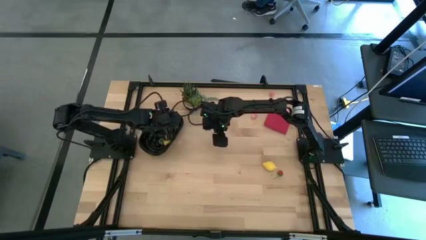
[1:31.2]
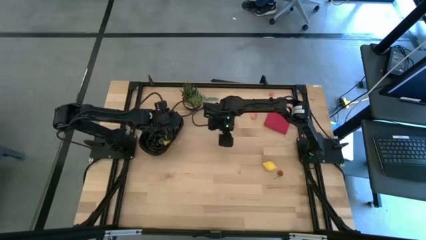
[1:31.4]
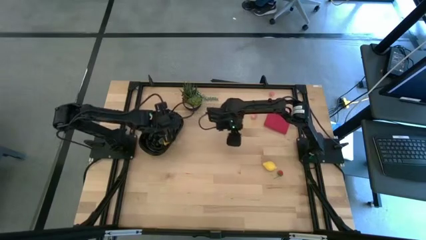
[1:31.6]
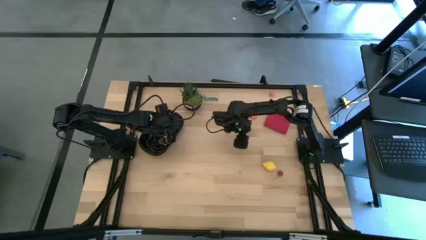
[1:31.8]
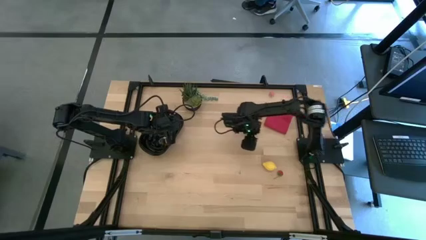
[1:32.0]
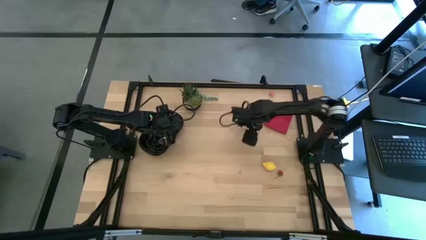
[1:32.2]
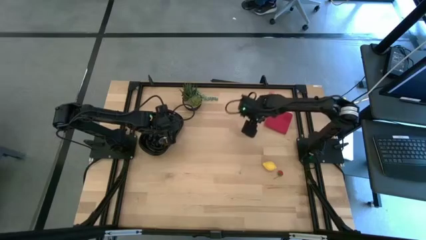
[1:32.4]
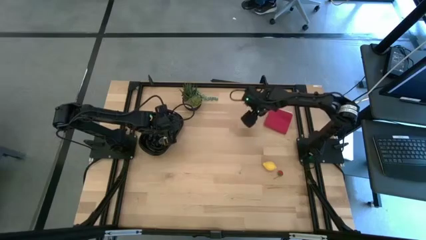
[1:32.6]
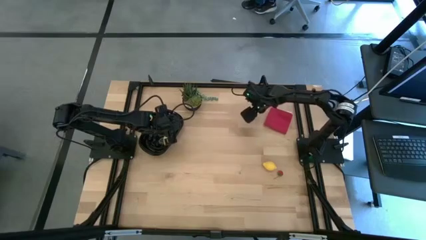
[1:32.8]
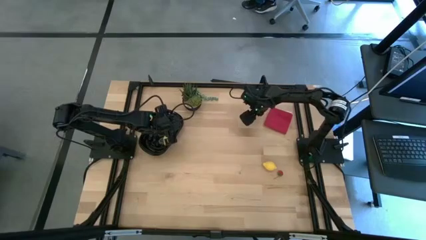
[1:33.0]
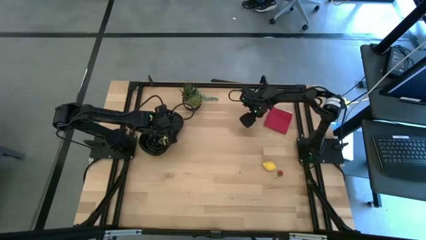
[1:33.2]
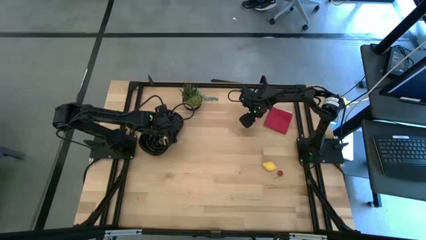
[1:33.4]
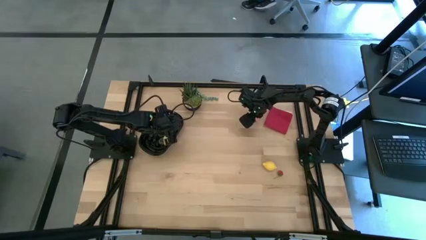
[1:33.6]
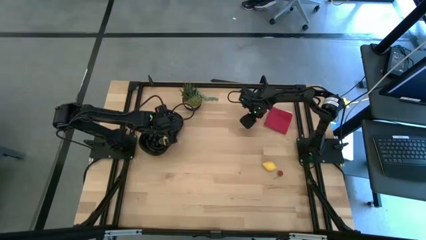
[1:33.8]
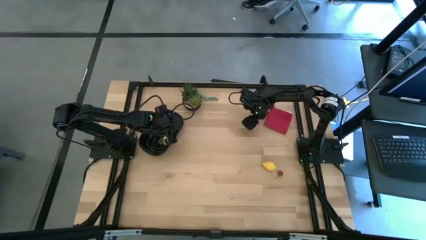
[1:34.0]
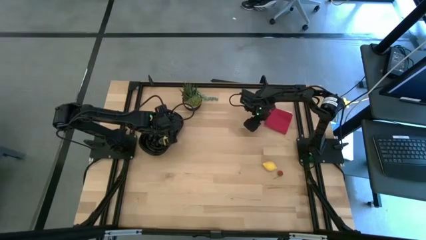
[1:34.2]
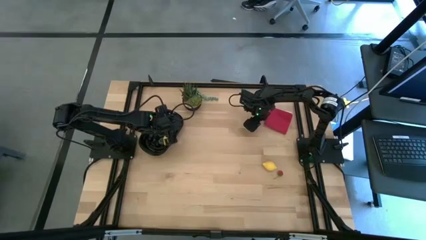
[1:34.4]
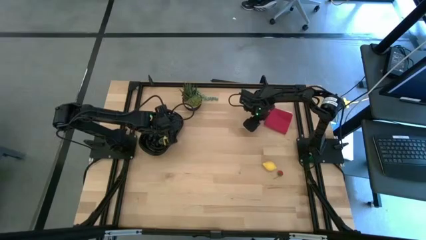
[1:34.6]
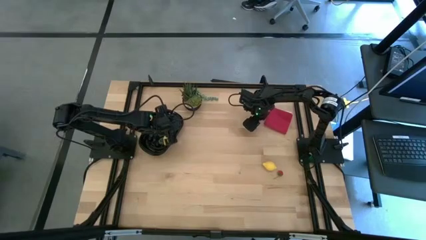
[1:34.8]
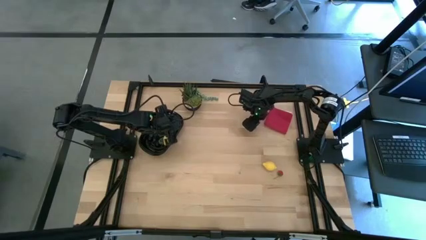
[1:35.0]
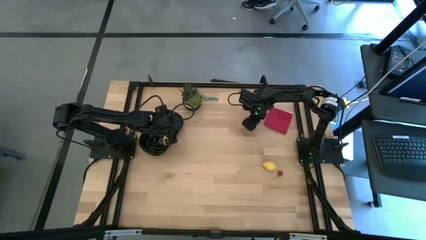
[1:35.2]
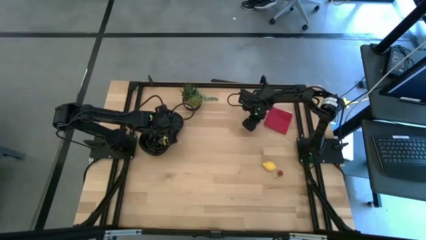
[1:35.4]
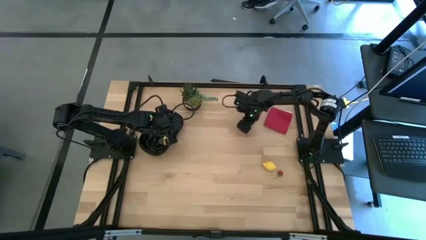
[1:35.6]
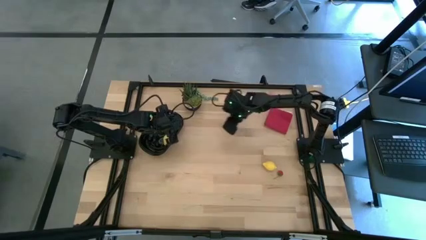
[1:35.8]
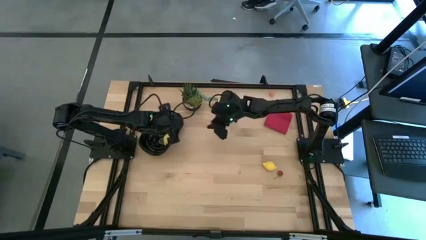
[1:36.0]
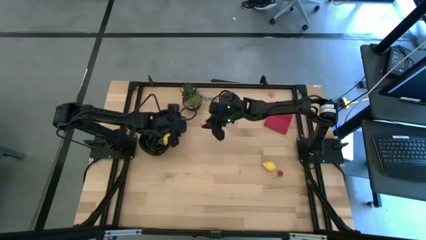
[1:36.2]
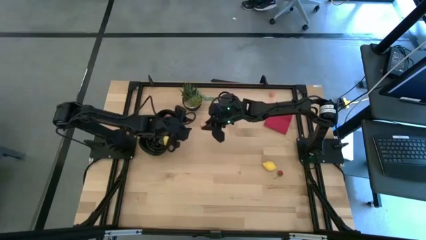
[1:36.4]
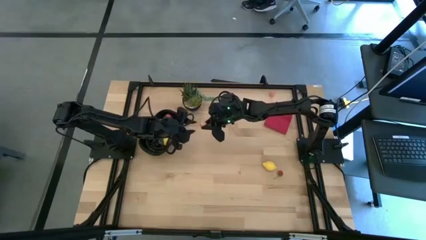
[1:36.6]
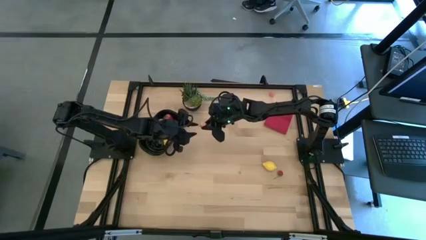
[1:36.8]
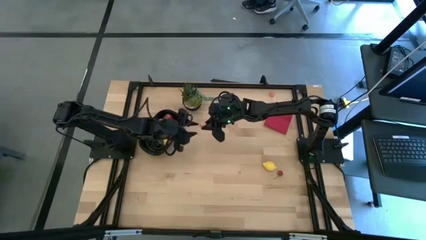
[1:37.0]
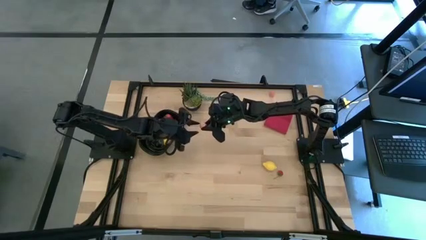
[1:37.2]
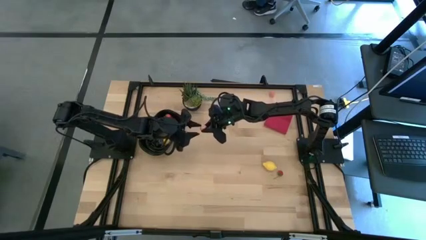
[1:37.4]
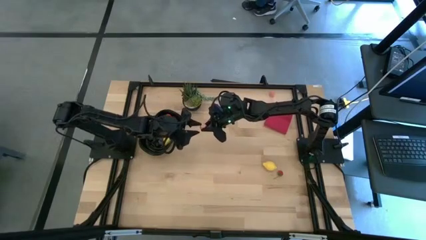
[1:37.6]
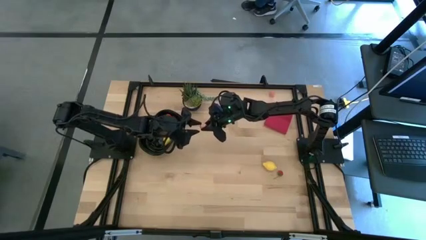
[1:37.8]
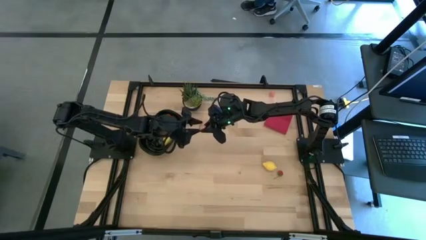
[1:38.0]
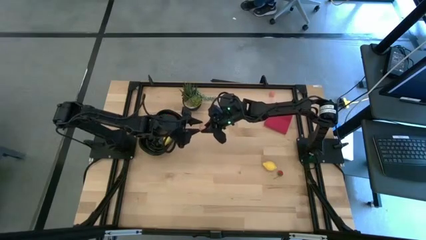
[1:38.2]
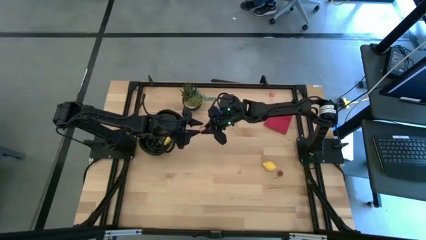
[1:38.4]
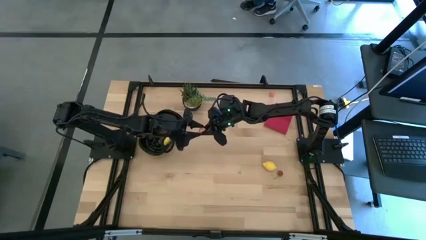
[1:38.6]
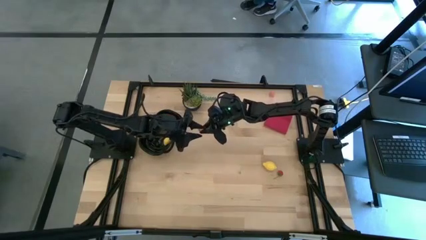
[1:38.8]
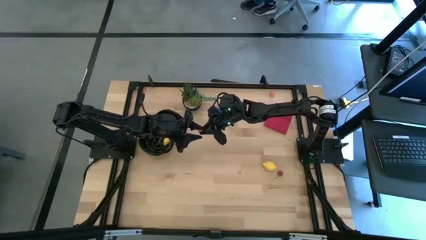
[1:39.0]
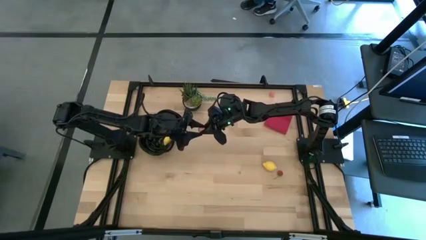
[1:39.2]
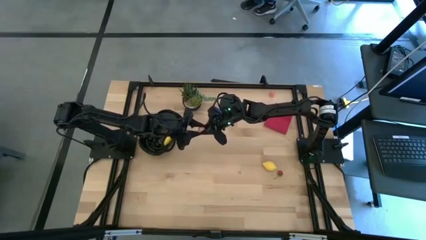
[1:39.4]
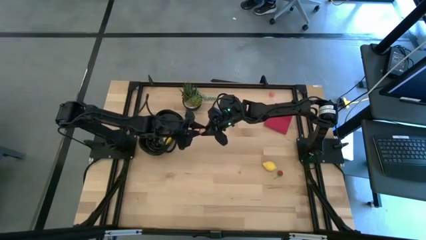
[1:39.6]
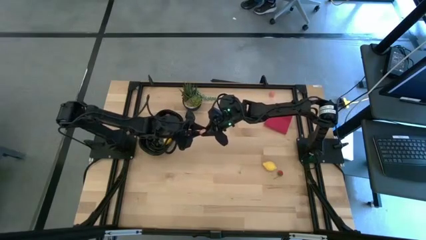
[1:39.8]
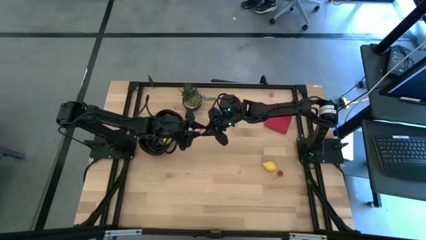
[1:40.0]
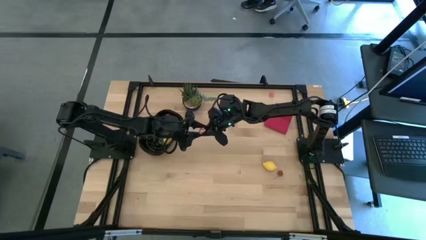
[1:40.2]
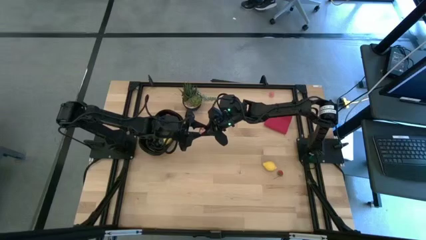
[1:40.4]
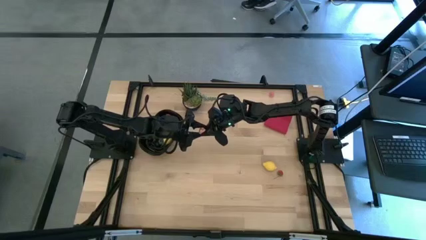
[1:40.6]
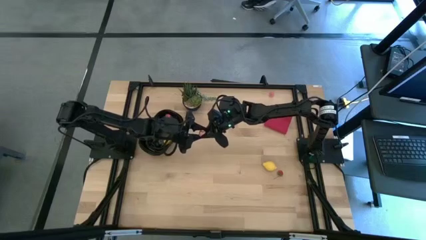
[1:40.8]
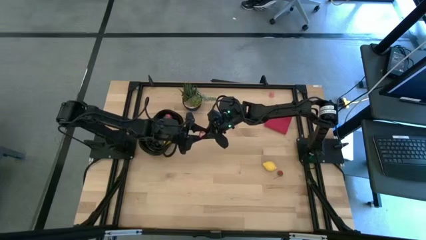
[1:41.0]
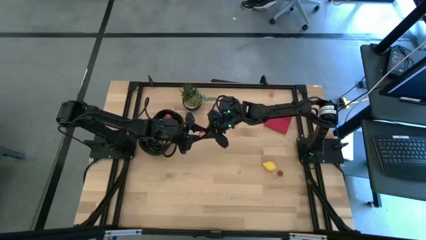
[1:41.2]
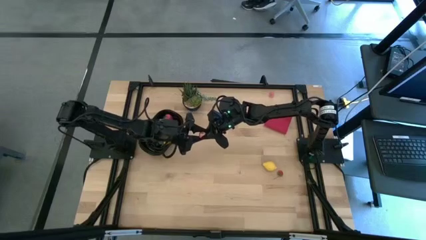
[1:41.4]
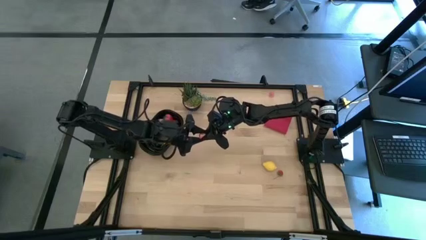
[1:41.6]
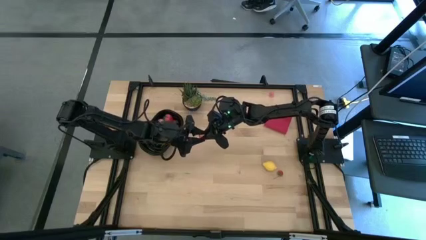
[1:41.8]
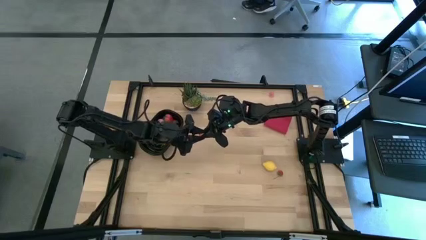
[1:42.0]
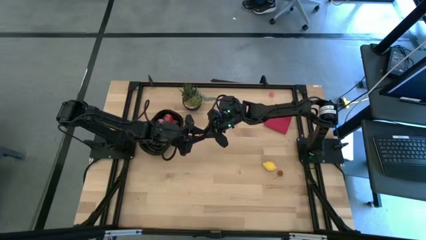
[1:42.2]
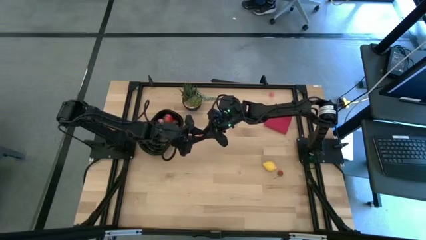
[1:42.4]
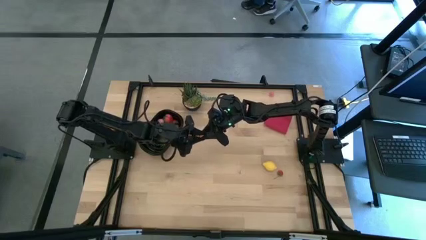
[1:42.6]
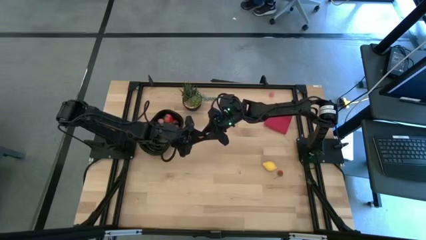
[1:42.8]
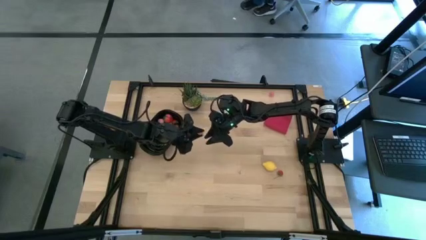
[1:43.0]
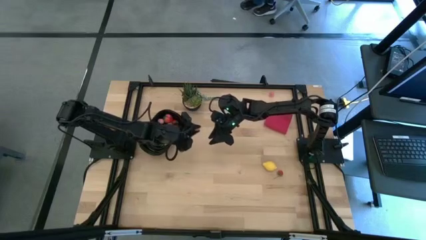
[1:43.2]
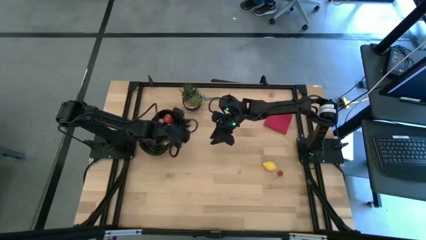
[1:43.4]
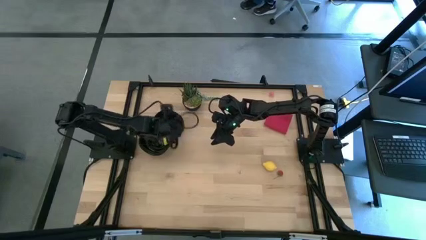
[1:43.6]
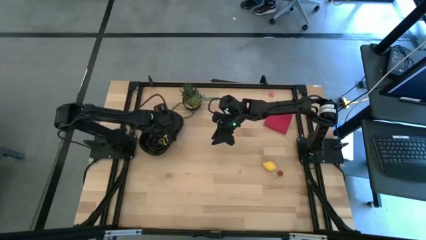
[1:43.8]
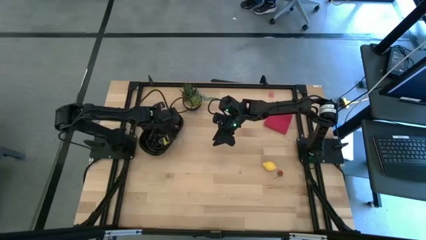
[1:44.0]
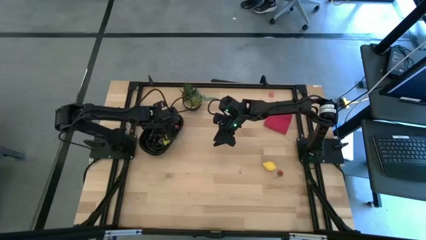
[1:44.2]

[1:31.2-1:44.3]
Task: Pick and placing Produce into tupperware
Put the pink peach into the black container
